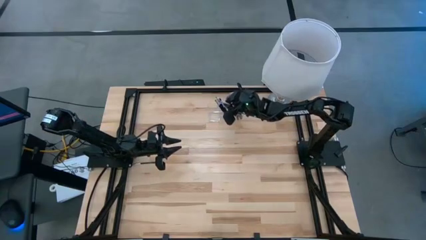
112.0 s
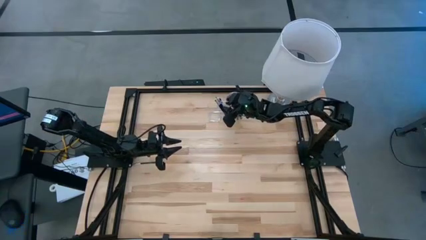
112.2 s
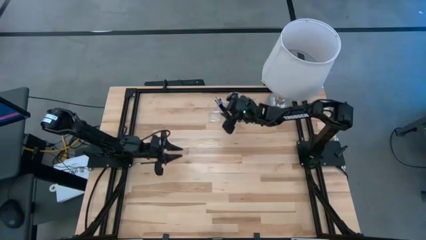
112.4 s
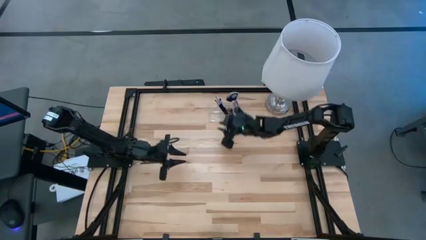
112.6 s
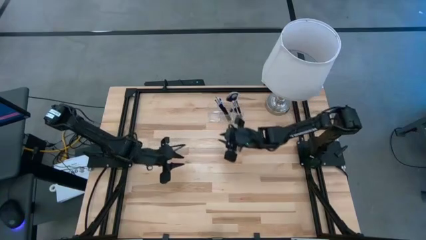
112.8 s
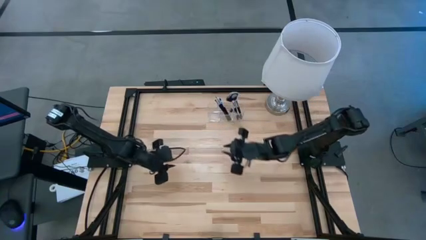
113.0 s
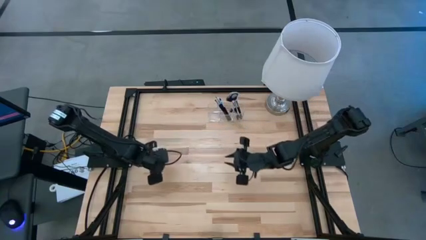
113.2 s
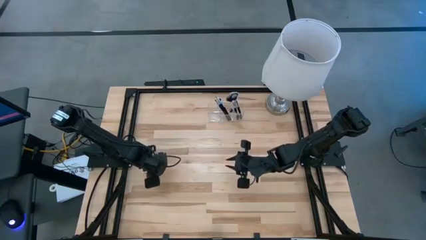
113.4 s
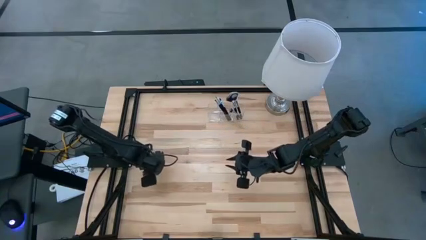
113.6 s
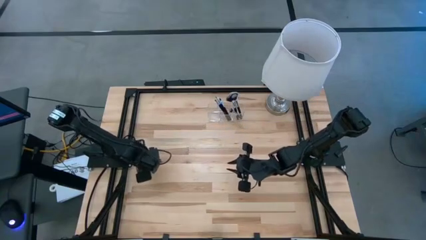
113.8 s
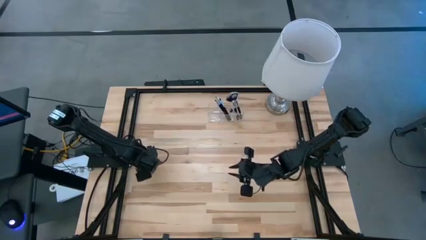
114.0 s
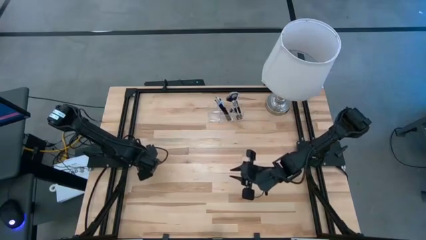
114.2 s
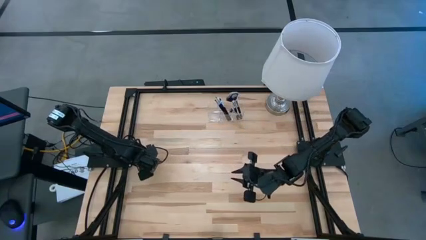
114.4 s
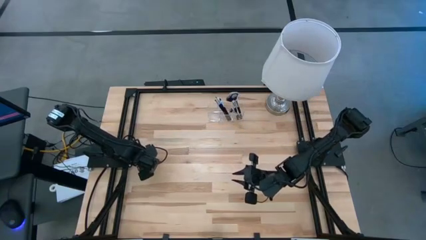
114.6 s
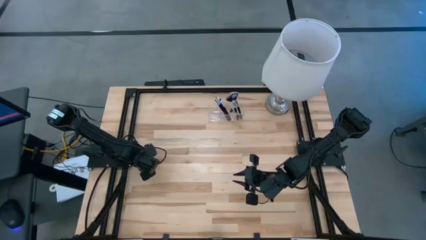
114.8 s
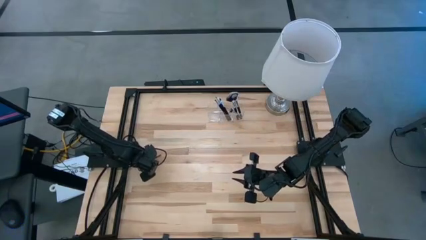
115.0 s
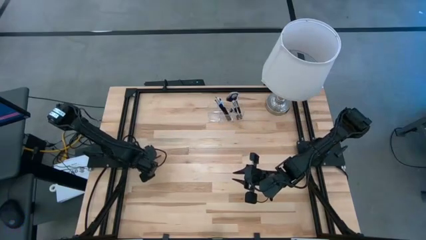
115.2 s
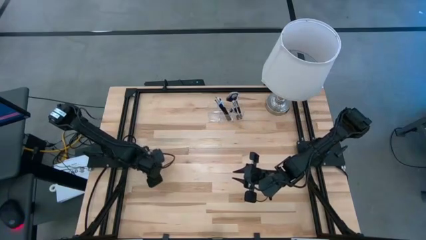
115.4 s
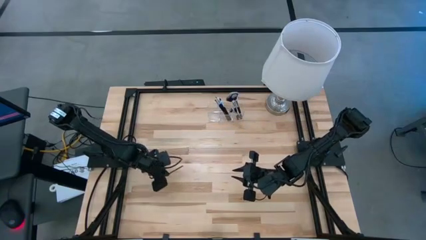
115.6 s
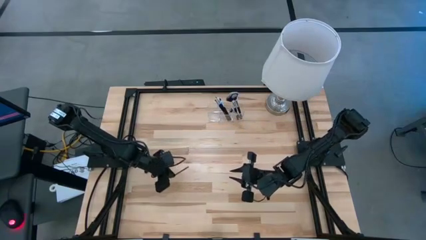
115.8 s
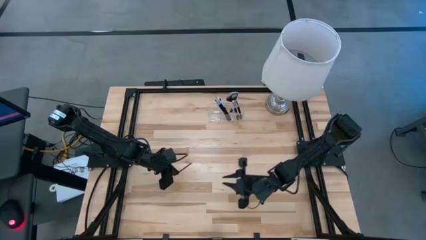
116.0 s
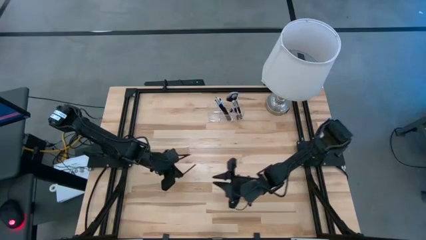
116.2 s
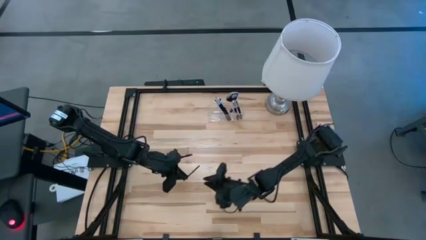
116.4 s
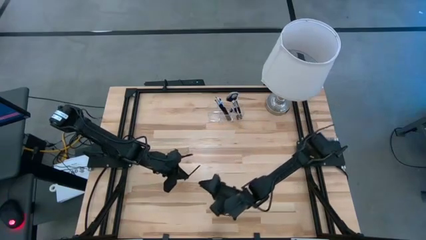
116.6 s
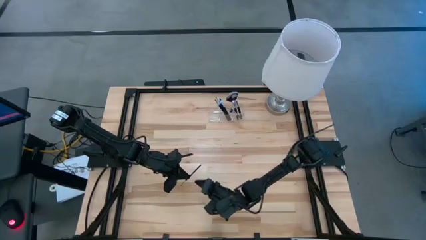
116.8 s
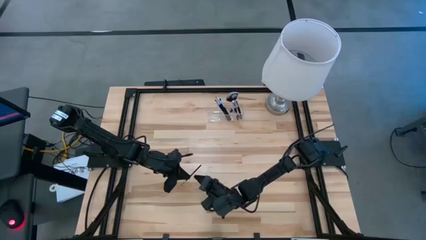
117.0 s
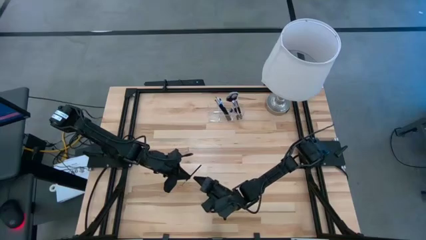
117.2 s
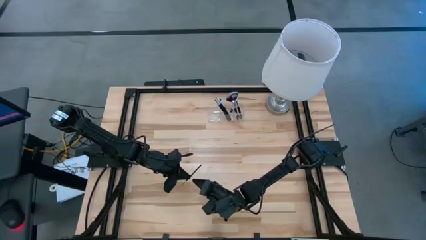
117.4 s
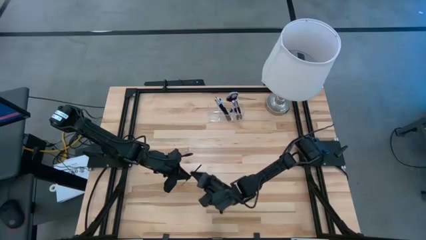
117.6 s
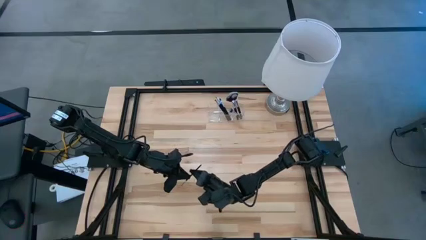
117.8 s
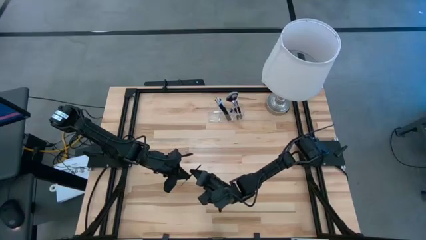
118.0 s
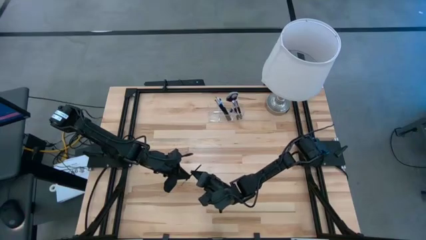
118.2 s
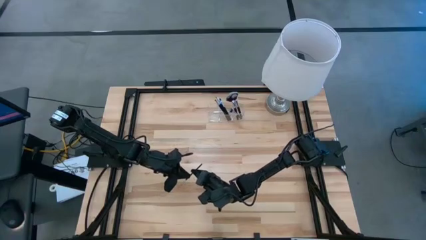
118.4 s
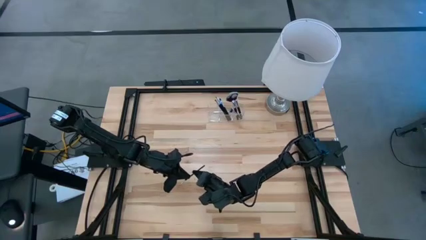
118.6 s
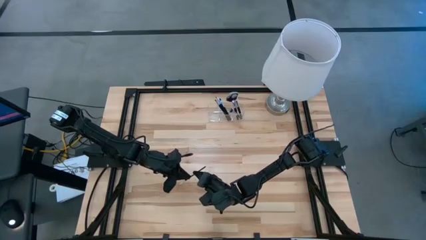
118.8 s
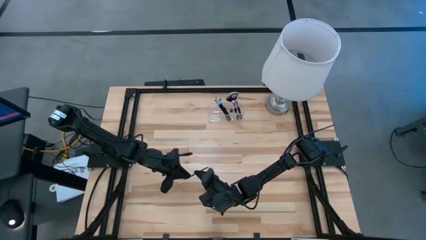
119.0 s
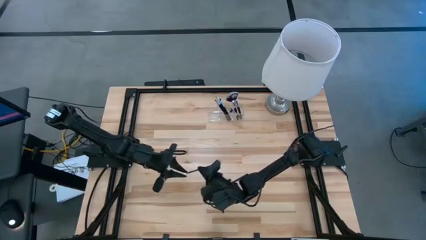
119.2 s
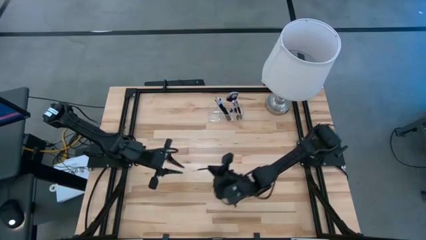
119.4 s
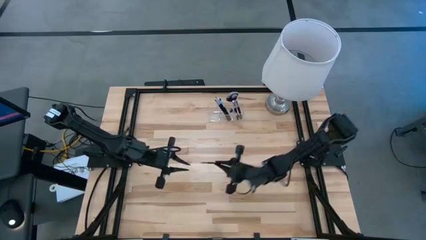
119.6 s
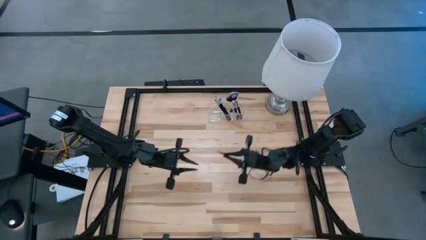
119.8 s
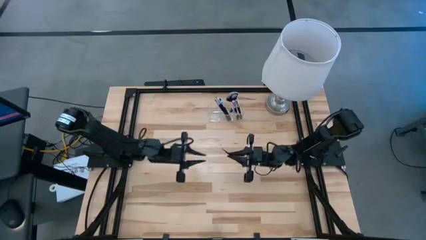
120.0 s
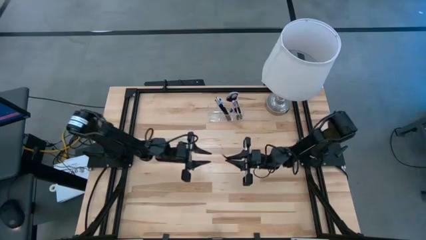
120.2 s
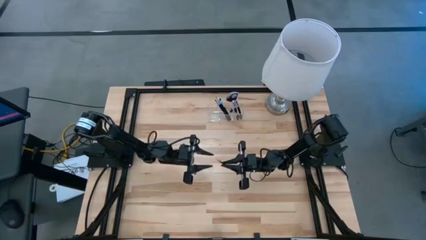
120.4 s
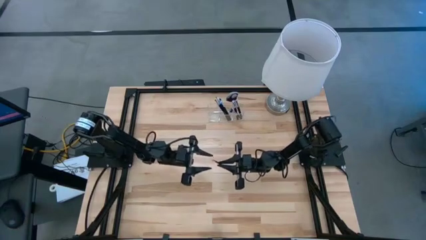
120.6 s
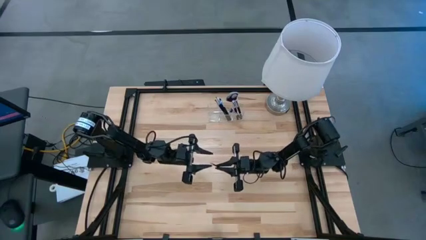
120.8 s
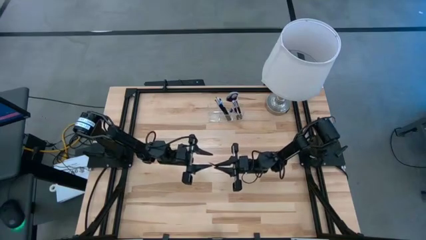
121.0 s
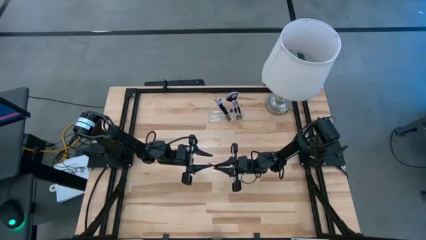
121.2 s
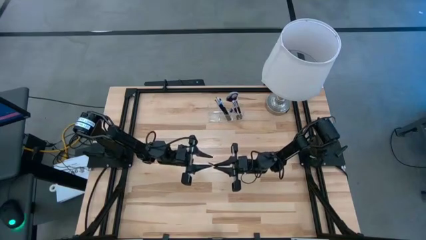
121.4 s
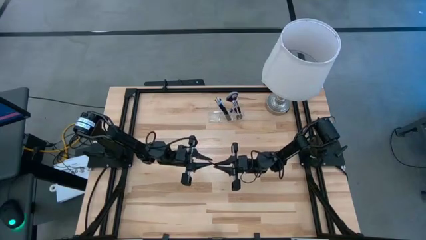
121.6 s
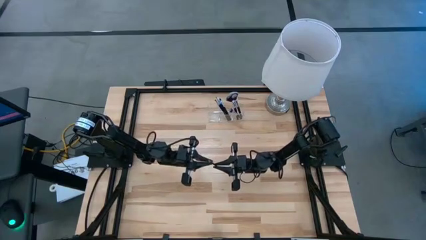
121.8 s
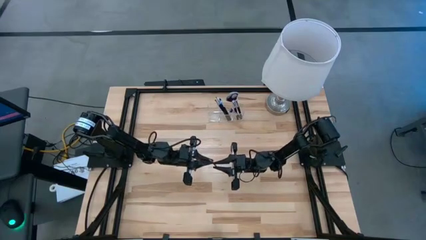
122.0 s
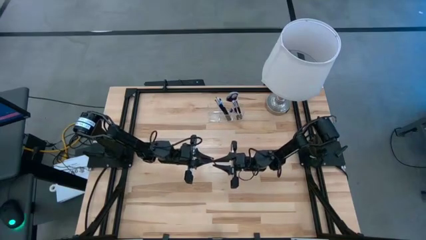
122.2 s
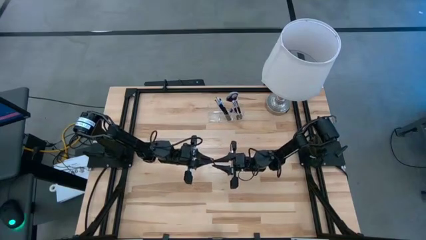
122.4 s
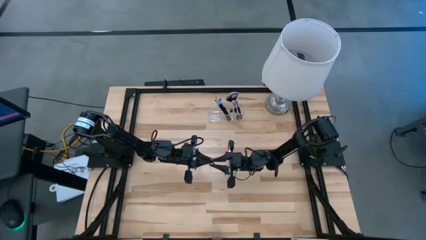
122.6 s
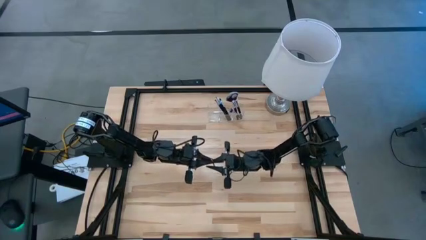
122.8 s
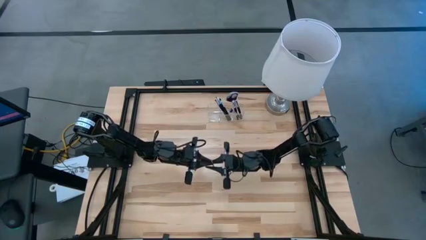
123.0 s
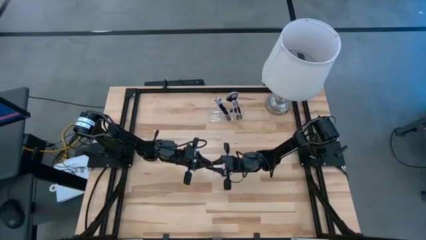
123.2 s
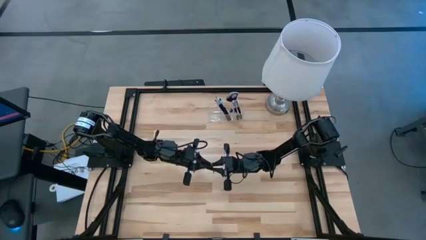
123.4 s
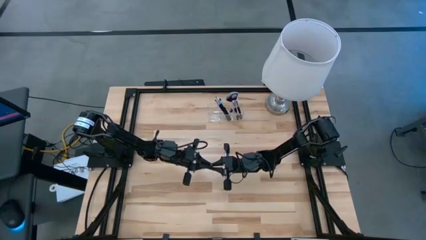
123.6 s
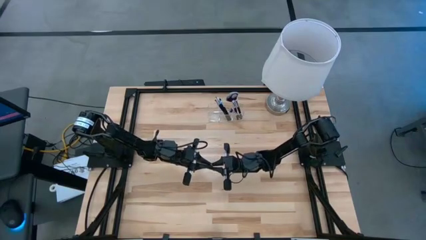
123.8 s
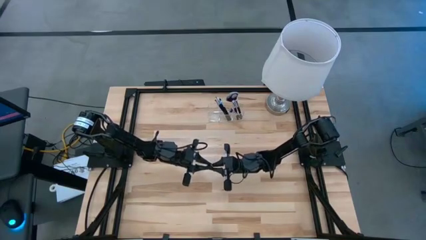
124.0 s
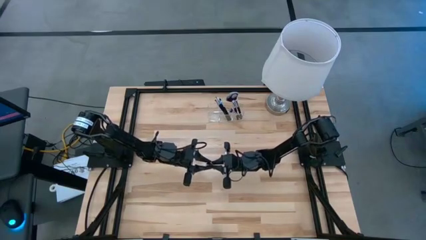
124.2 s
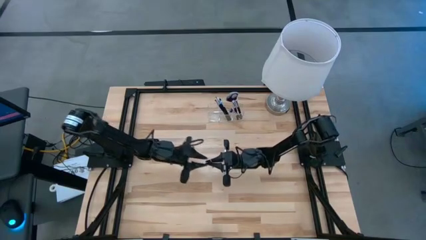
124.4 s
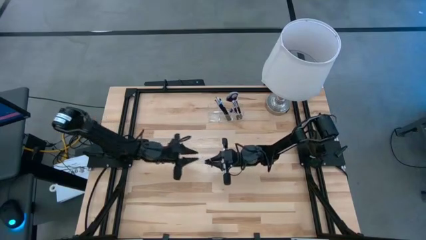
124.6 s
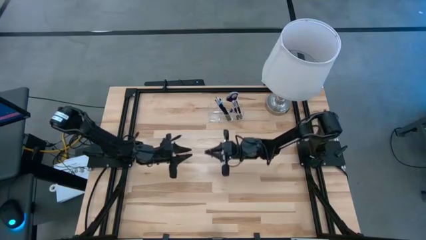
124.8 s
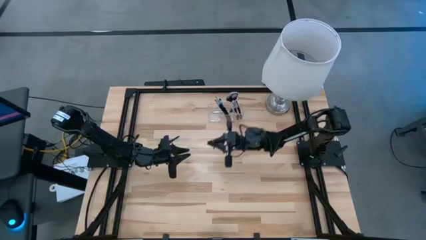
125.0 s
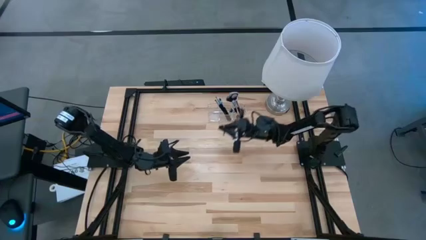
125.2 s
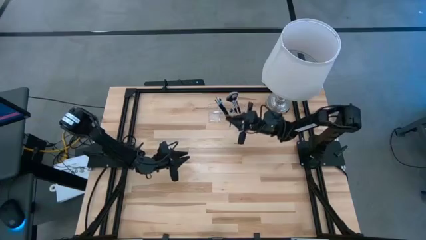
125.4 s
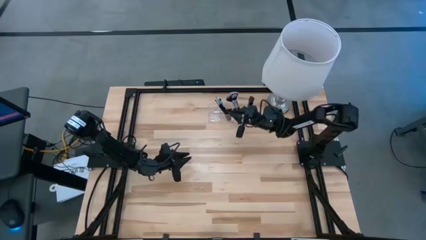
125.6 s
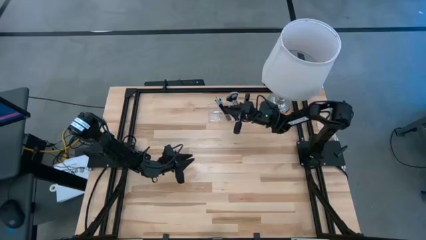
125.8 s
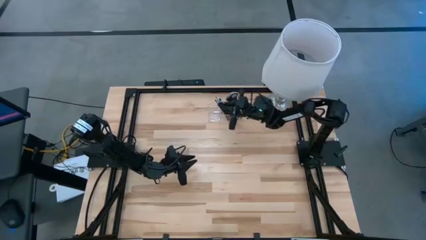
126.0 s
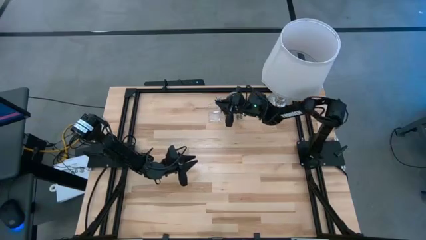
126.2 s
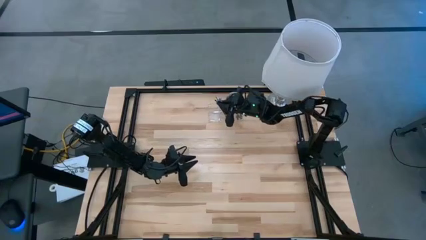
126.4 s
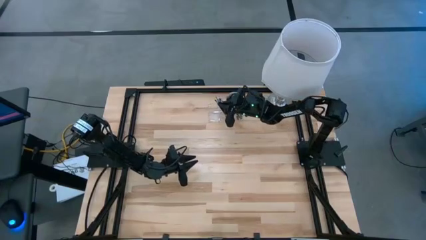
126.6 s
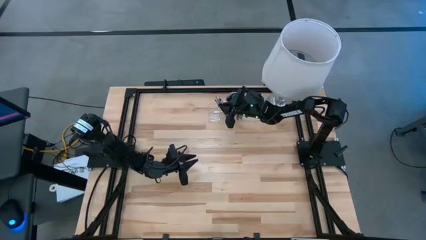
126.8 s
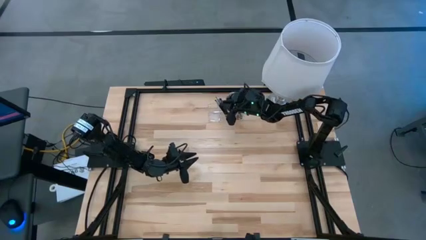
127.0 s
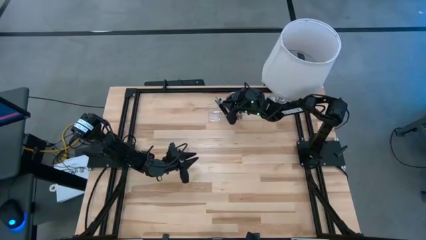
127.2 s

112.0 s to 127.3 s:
Task: Put items in baskets/containers
Put the silver liner brush into the transparent organizer

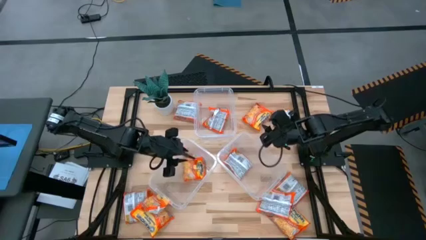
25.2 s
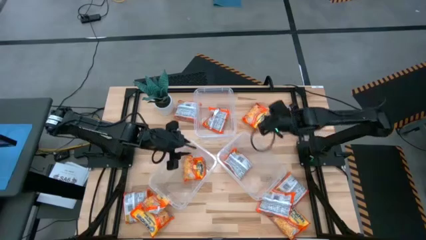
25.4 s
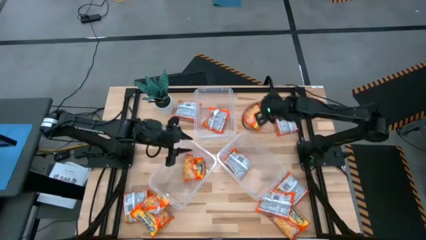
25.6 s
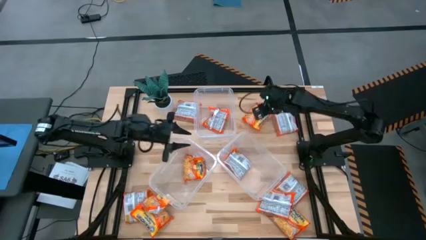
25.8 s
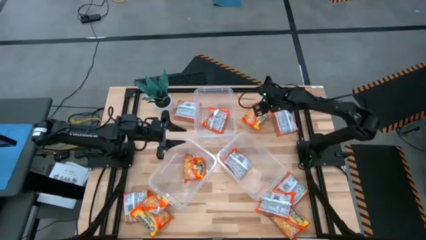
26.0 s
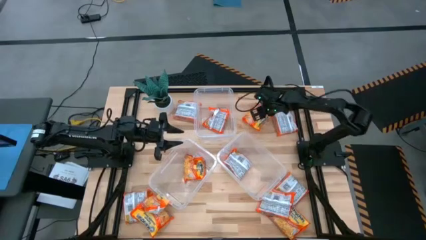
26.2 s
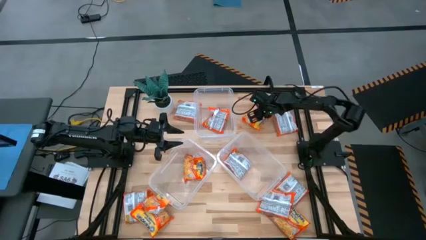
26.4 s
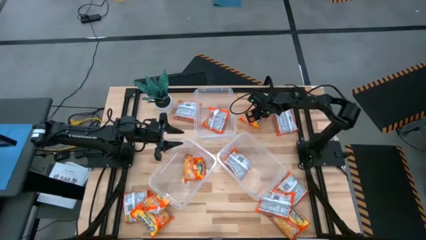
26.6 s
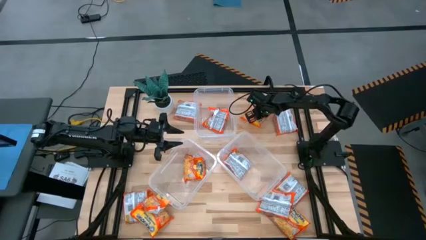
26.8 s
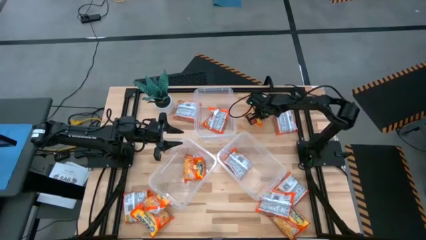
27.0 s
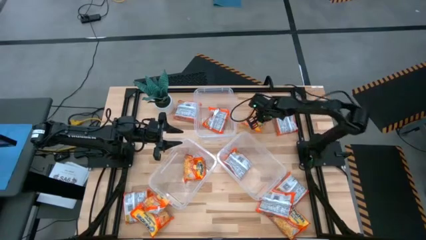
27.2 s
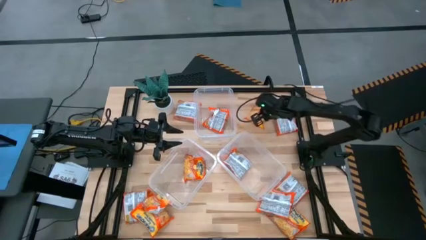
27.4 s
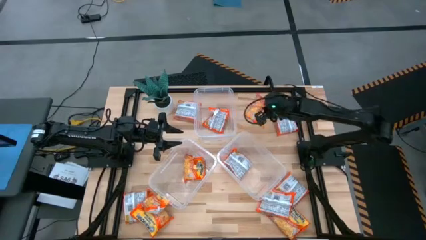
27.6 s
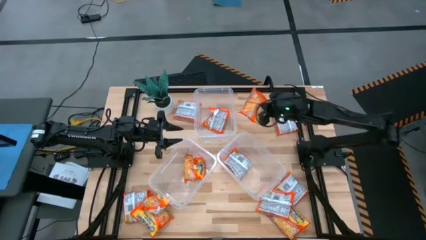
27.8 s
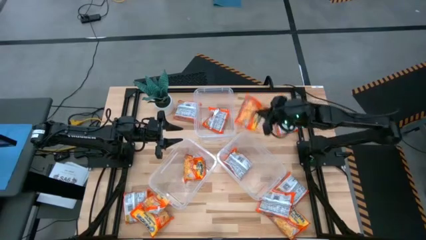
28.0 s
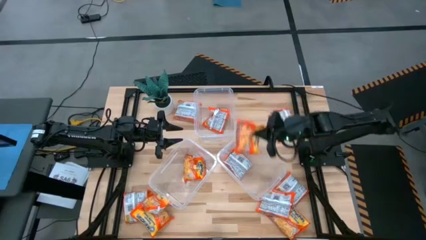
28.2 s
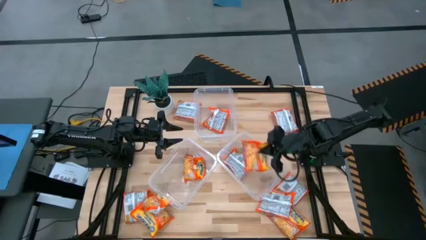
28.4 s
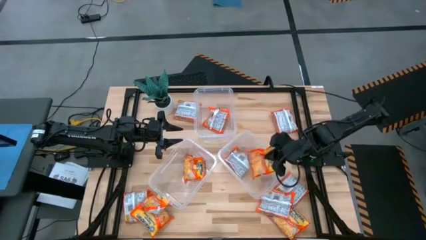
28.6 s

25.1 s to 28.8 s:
Task: Sort Maruchan noodles
Put the noodle pack into the bottom right transparent bin
